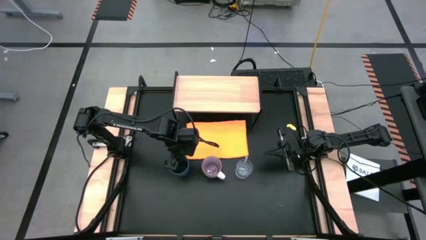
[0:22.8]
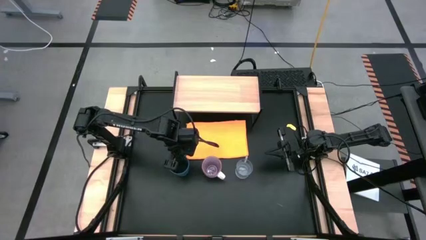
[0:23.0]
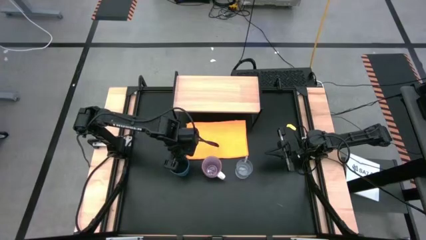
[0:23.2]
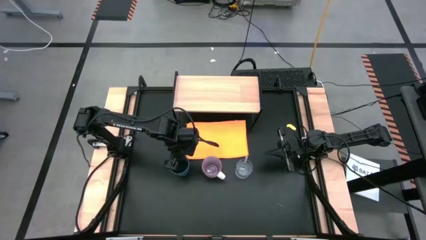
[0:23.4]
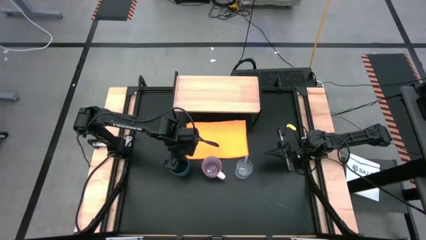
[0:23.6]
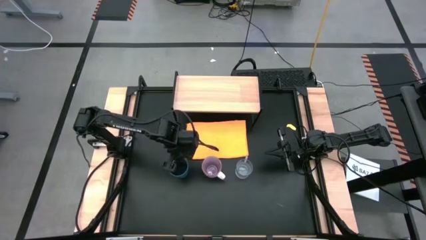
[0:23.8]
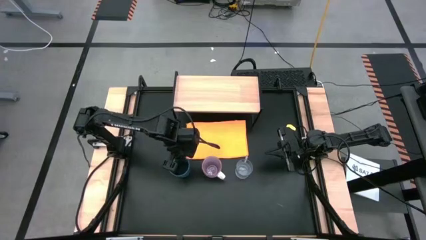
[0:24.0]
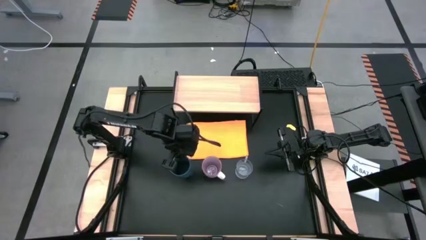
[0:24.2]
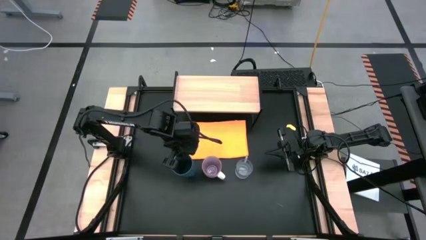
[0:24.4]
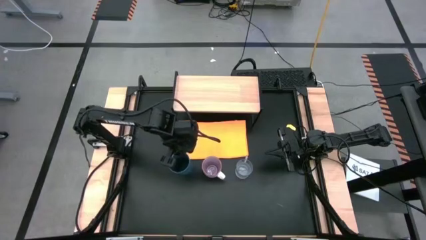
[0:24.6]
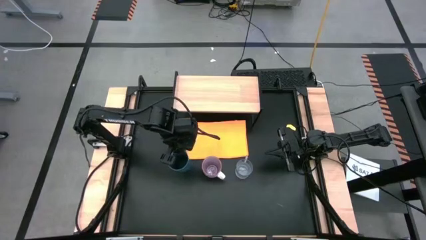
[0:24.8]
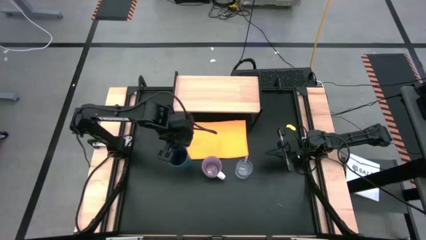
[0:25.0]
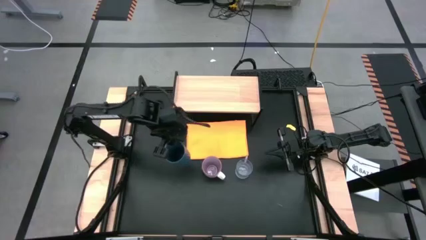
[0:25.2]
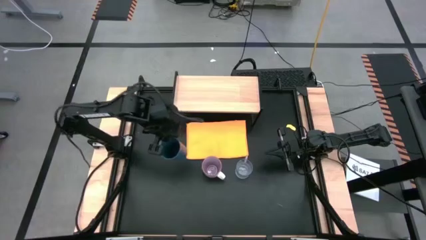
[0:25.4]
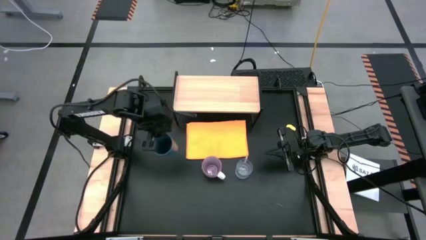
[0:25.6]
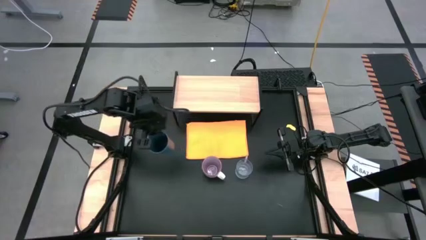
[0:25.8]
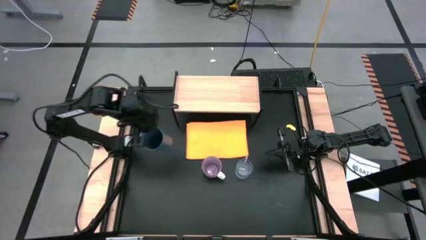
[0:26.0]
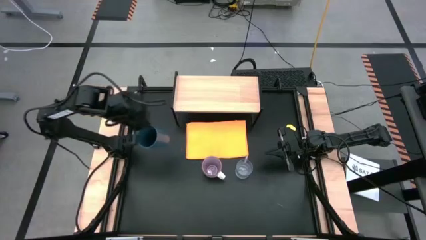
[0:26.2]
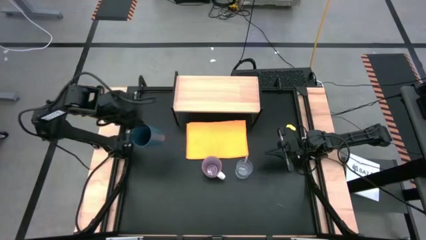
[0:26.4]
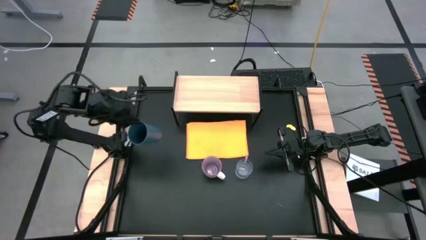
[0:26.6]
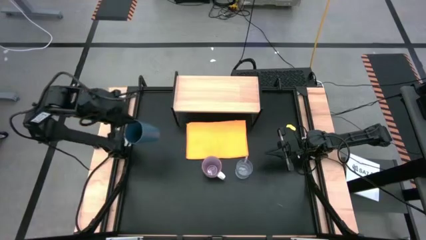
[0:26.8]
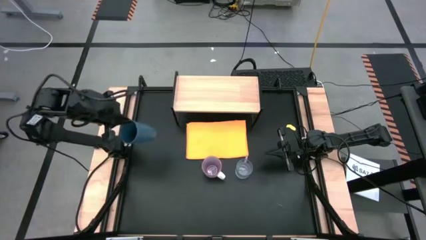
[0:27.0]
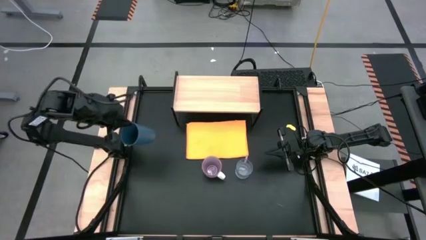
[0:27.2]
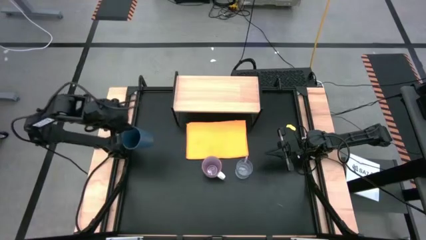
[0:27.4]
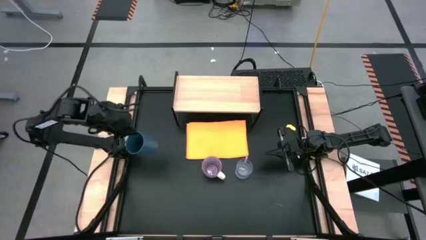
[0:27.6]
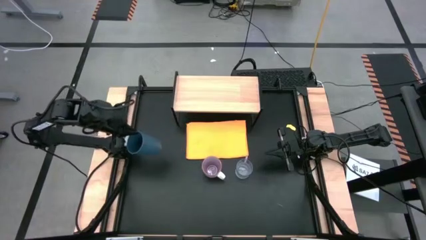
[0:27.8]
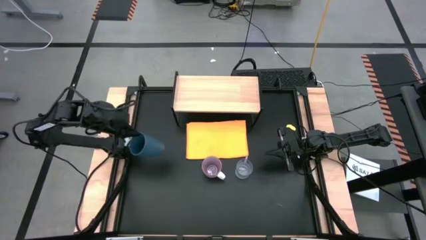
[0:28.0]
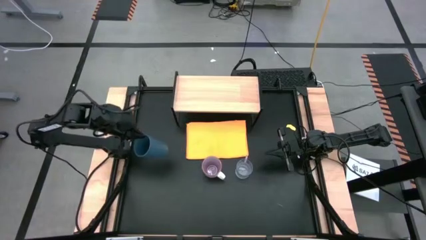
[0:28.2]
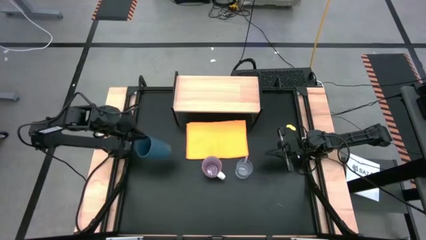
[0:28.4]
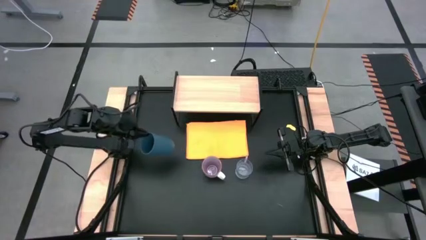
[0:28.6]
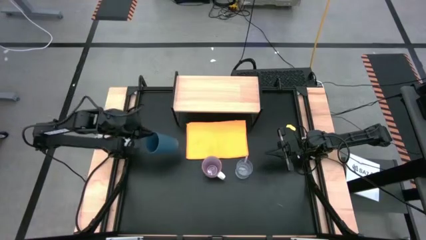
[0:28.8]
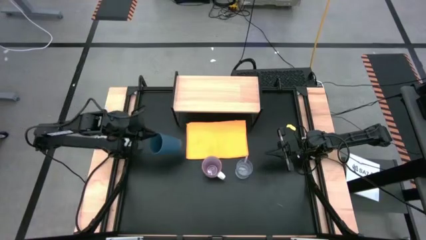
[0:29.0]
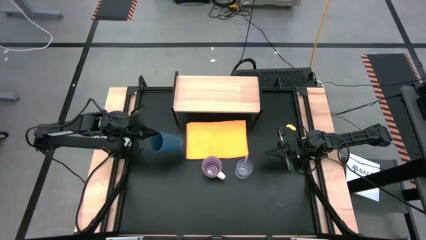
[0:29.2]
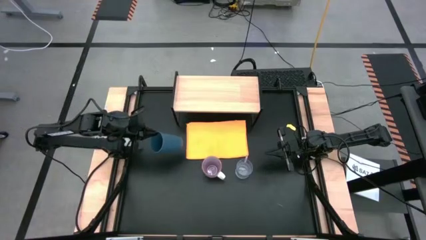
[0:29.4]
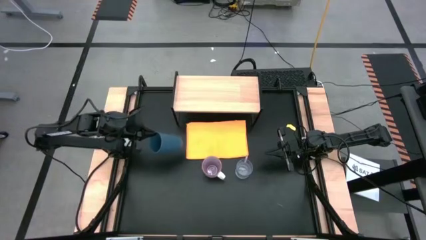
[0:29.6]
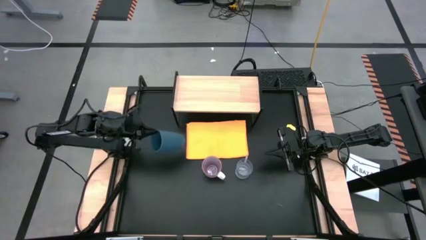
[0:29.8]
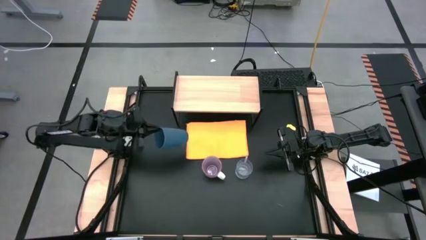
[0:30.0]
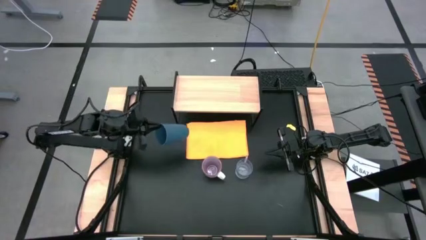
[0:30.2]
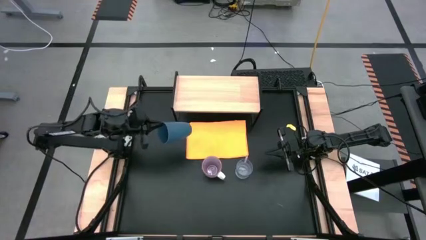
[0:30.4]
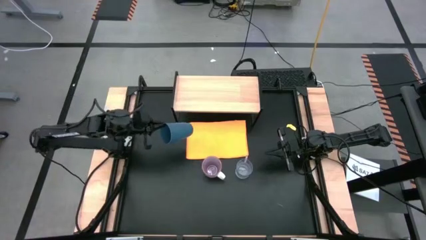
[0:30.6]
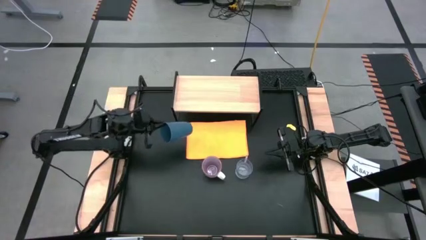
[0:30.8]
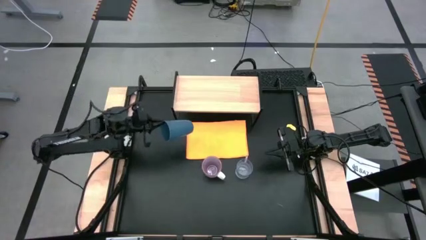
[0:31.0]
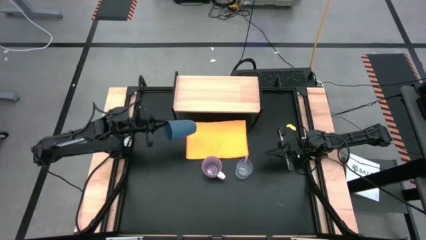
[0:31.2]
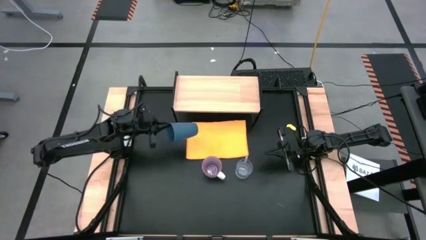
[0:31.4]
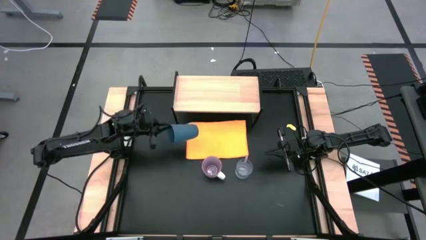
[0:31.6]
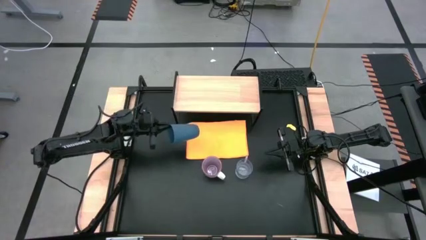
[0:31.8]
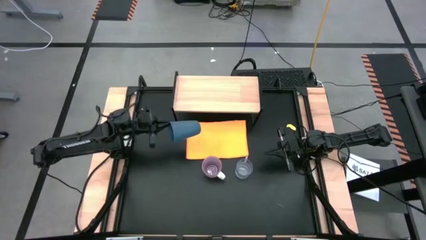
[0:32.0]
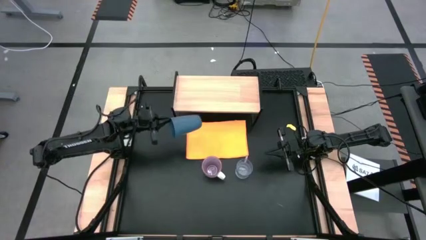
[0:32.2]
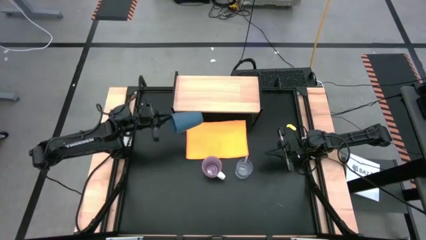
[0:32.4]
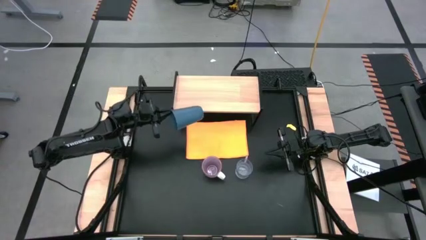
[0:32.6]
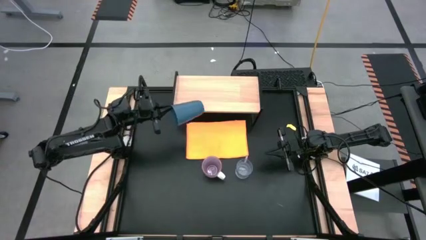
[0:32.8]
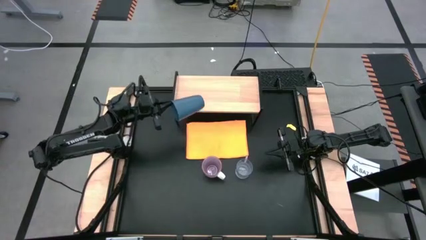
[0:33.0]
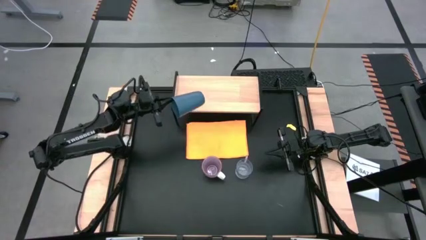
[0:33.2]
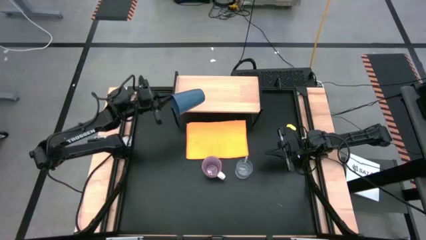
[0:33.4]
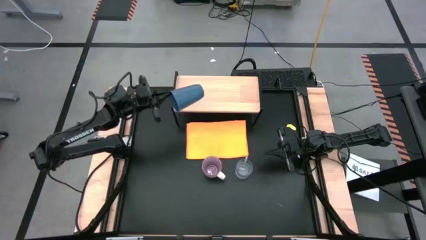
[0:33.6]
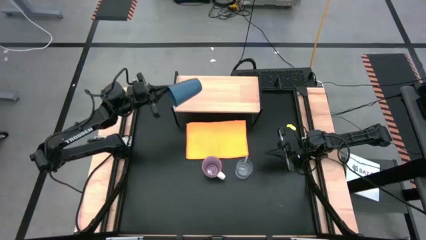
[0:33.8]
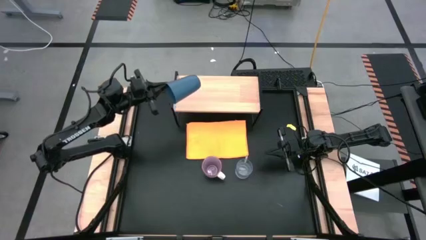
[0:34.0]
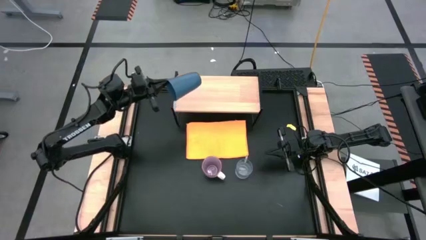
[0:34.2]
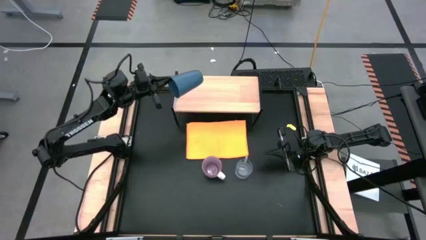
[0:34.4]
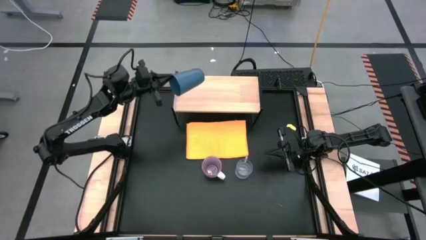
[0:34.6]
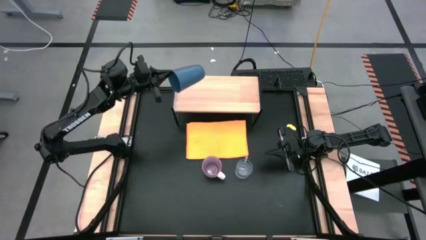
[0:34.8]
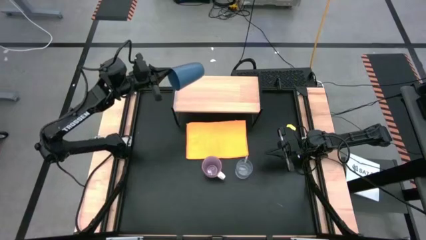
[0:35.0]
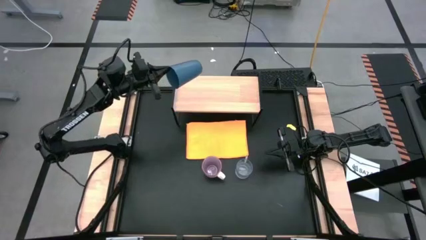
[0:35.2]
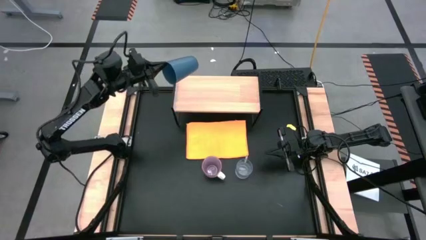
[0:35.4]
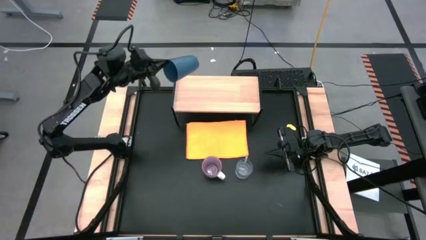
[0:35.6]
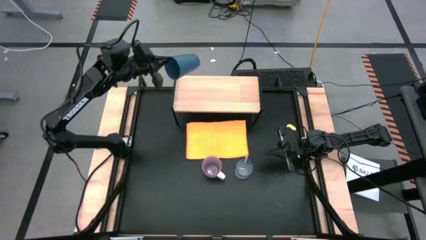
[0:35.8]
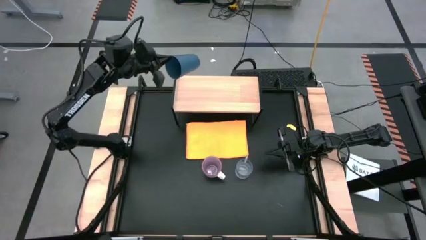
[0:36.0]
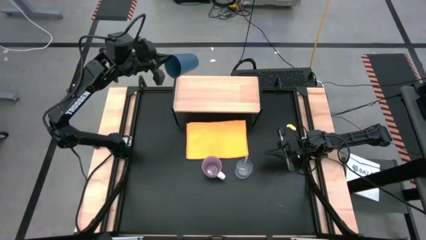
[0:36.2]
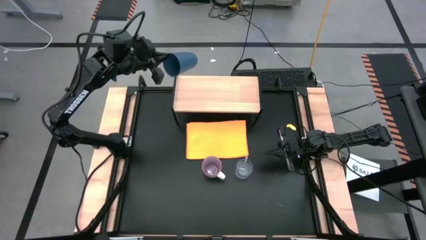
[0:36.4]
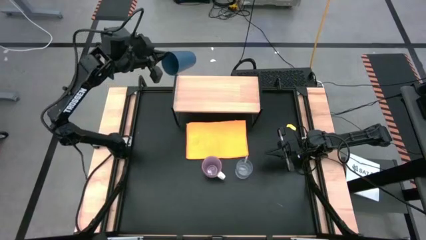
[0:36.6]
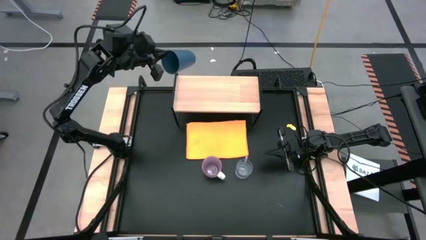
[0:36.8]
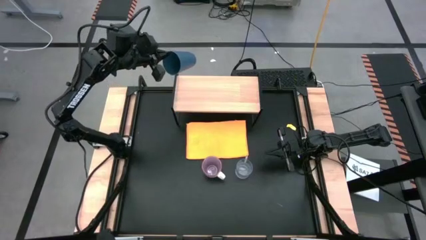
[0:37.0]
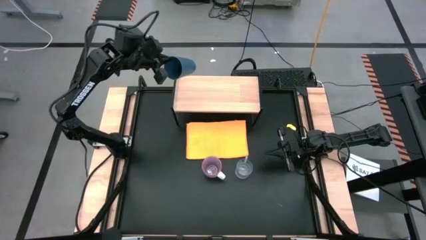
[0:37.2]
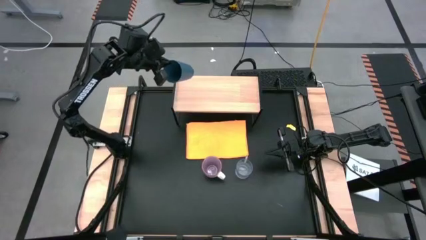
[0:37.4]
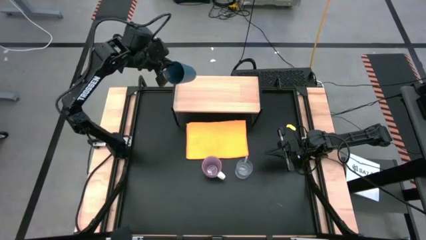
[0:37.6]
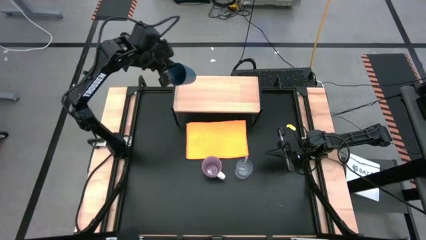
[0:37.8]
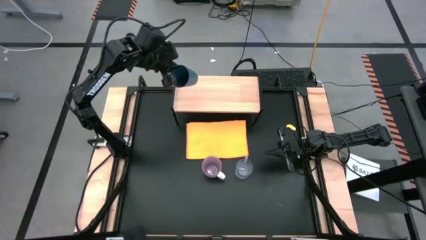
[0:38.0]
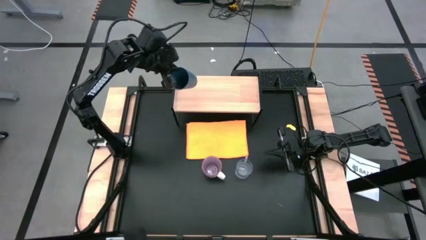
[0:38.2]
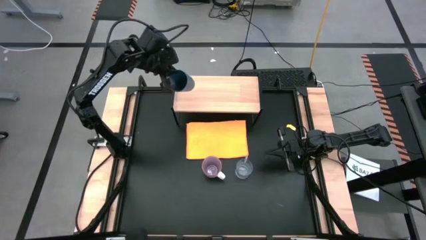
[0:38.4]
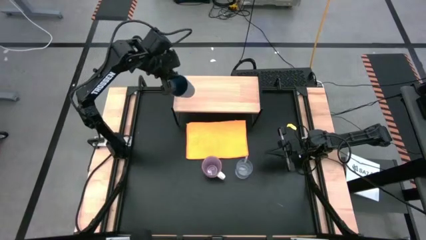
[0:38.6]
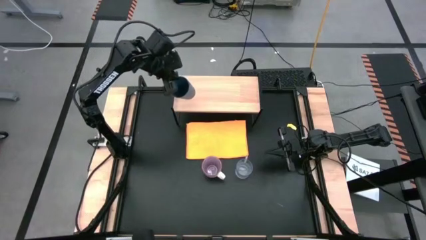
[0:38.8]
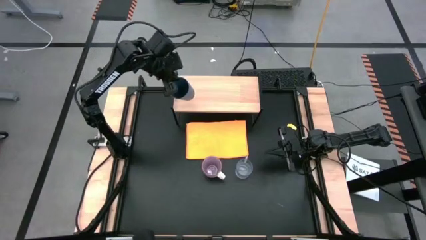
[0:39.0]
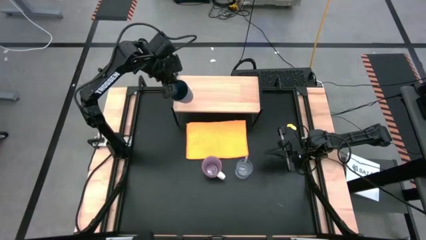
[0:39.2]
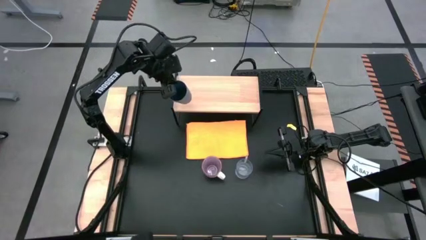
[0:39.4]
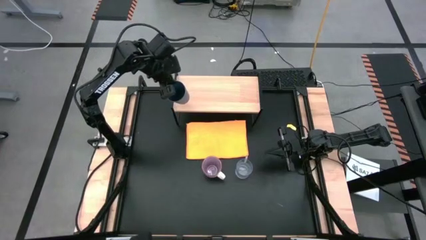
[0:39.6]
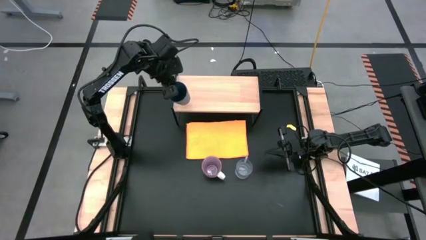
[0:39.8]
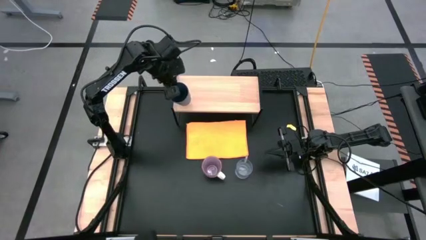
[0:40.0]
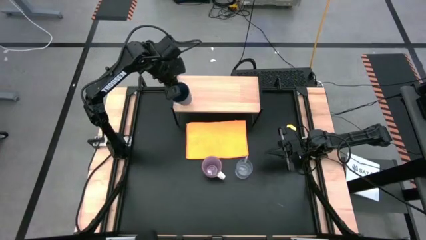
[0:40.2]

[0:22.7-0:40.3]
Task: Stack small to large cups/mugs on shelf
Put the blue cup on the shelf
